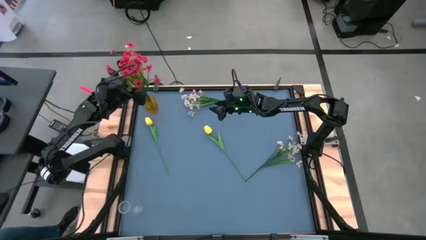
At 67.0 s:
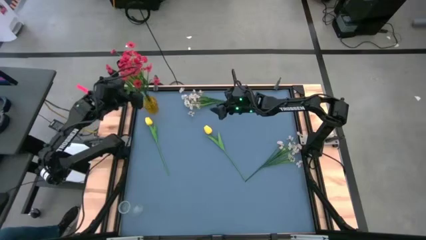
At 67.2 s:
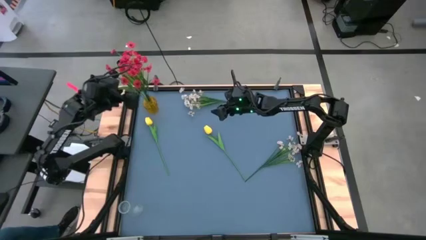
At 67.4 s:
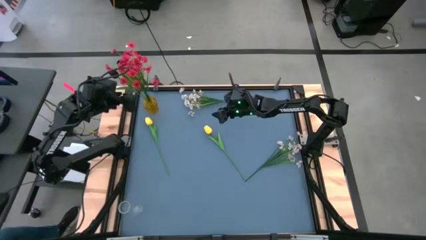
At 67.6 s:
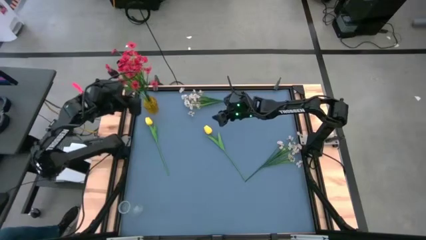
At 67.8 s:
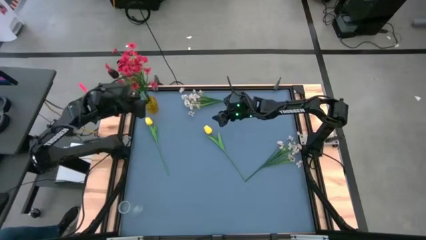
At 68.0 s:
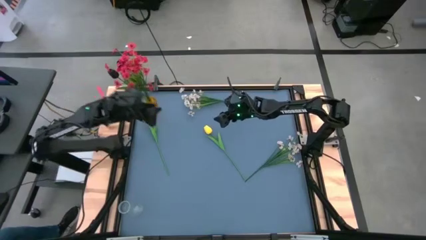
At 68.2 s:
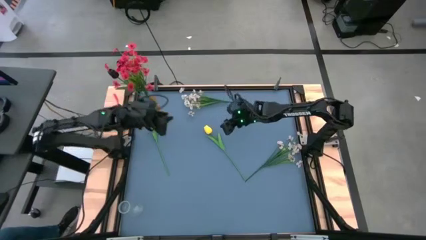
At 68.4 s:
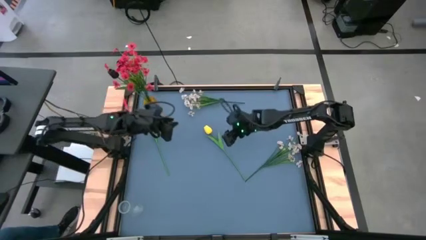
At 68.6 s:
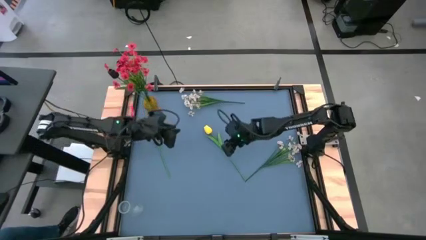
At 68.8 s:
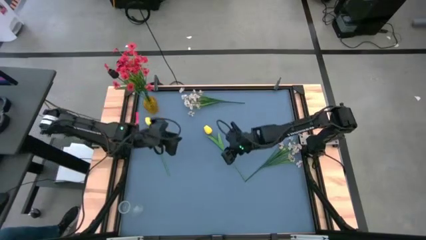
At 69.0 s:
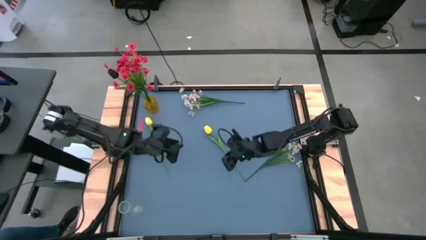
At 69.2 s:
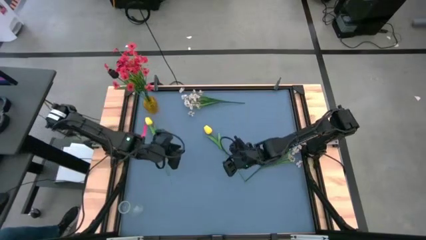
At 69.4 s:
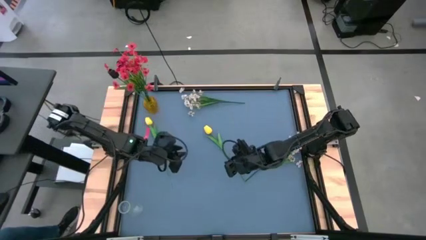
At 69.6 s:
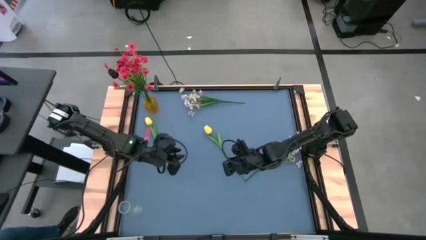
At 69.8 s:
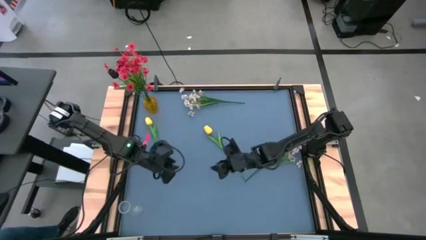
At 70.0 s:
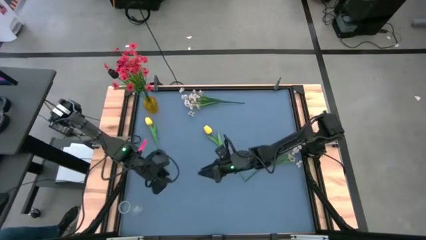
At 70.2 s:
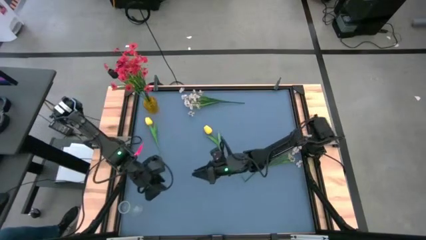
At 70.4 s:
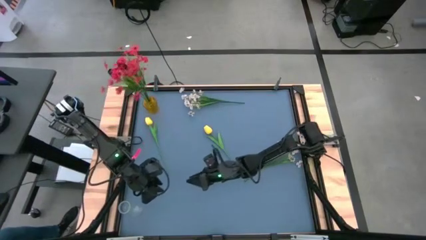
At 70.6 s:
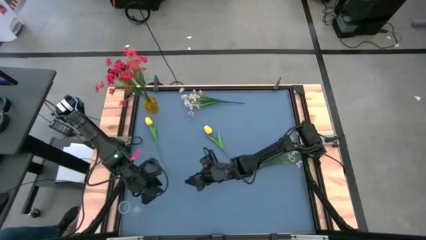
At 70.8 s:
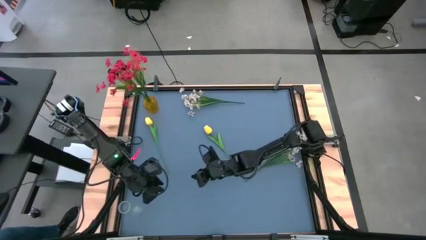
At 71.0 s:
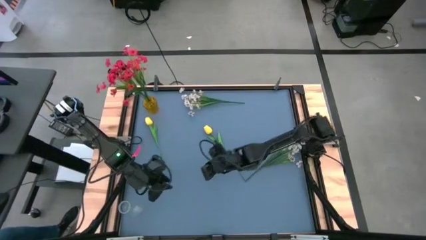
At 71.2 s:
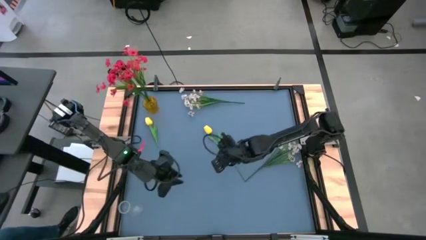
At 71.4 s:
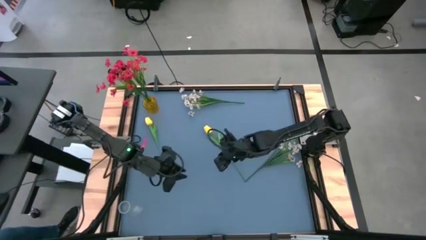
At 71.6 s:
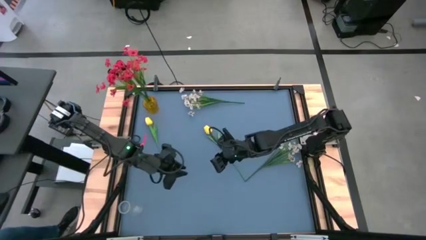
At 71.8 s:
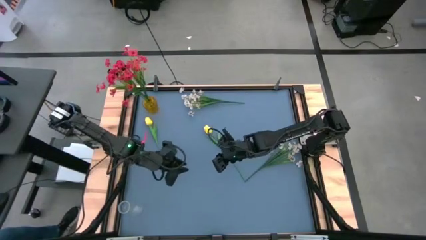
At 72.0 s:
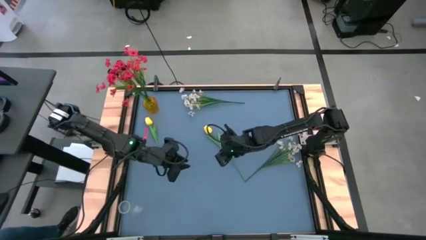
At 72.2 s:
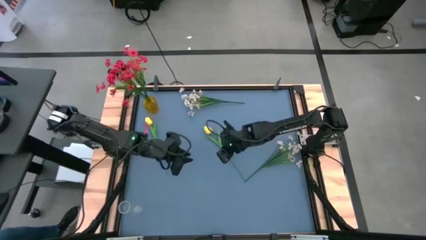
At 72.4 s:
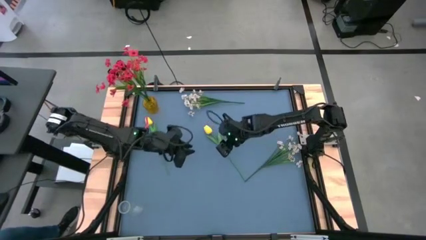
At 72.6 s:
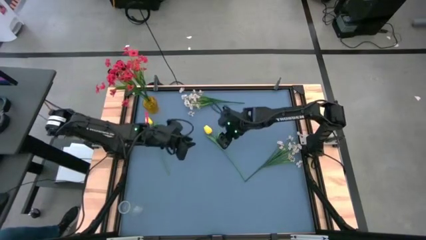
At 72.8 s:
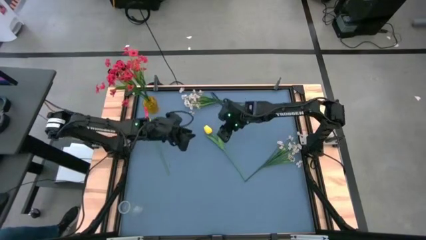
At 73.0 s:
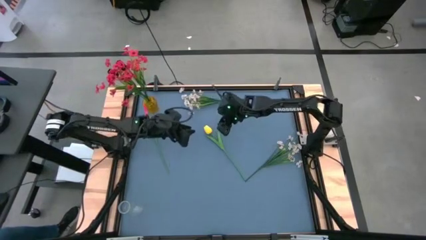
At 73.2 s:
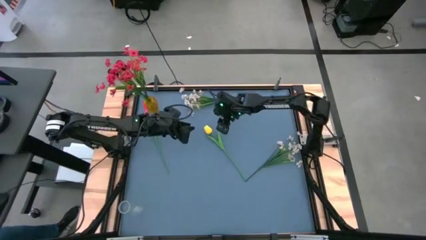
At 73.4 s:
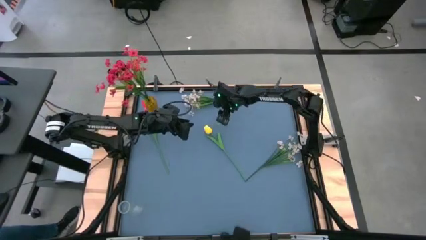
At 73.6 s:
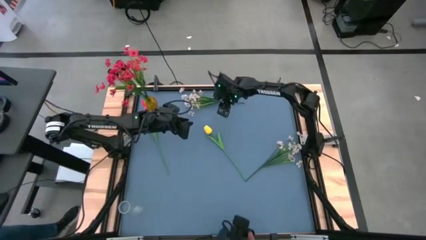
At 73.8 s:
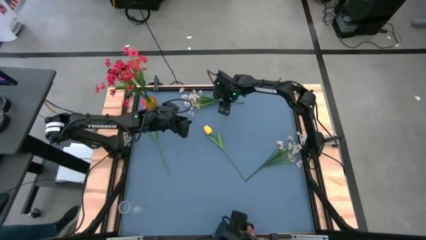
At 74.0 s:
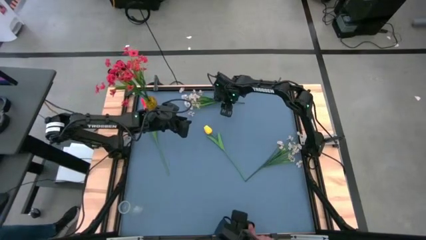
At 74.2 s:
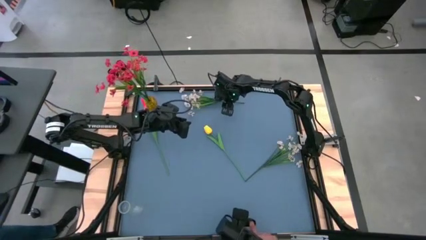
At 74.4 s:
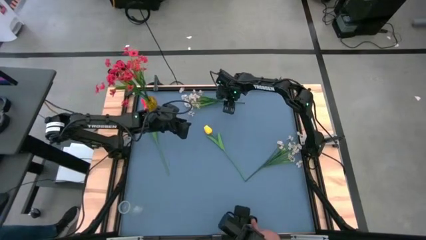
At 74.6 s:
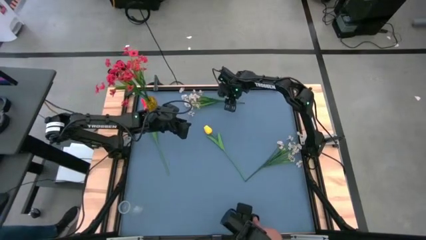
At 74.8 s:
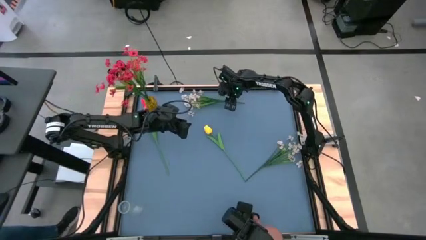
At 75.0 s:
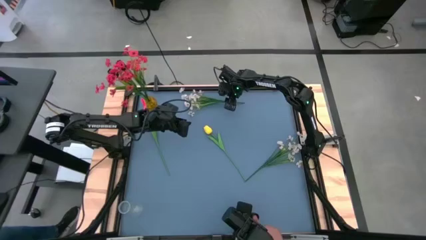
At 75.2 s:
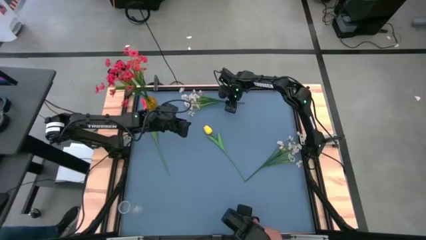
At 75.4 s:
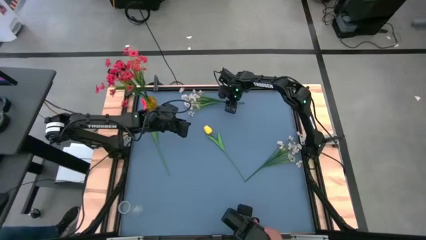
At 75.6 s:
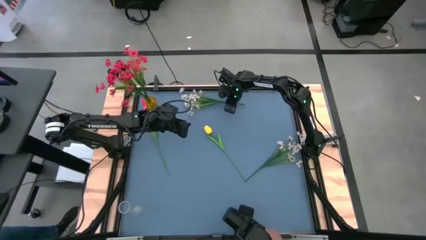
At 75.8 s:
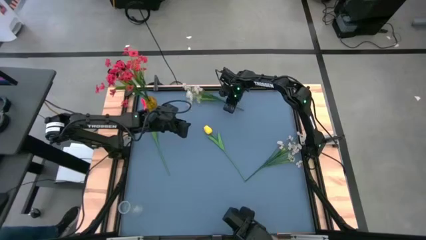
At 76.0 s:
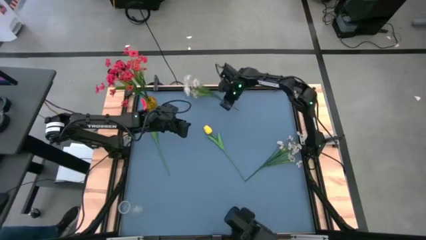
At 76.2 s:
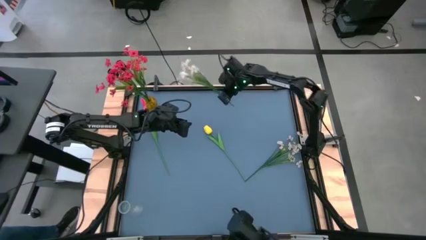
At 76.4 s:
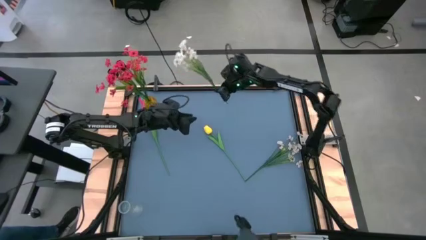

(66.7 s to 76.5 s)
Task: Sort flowers into vase by color
Put the top white flowers into the transparent vase

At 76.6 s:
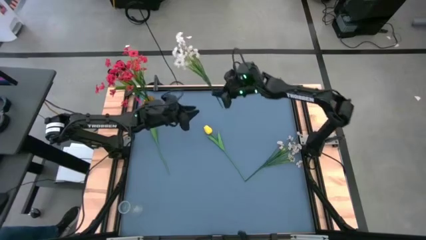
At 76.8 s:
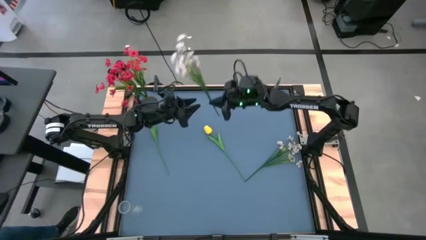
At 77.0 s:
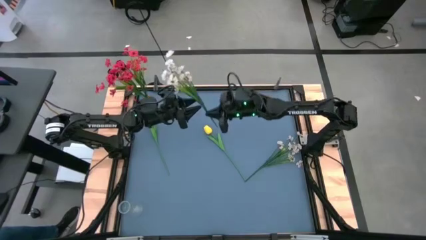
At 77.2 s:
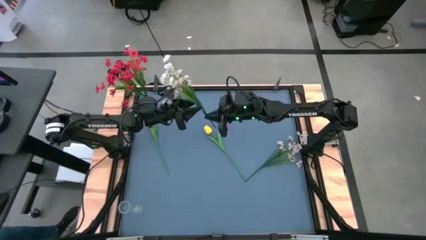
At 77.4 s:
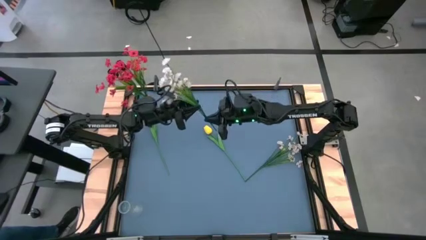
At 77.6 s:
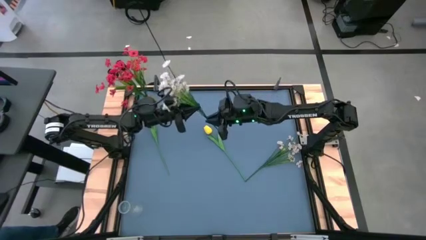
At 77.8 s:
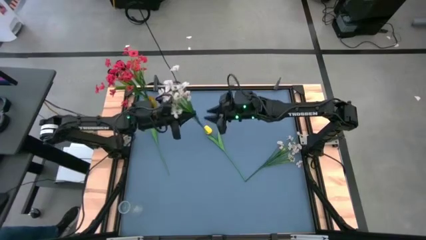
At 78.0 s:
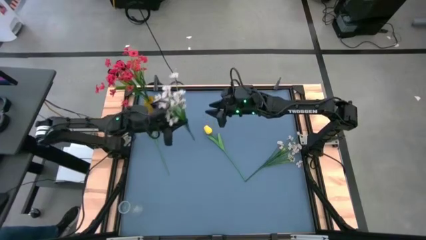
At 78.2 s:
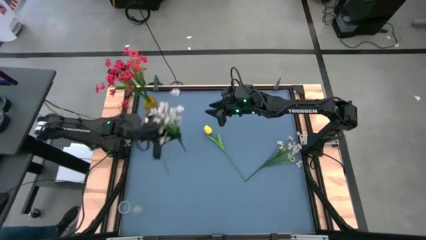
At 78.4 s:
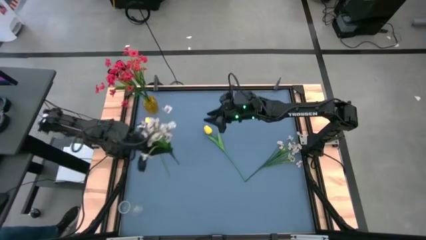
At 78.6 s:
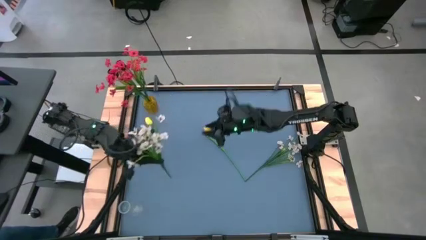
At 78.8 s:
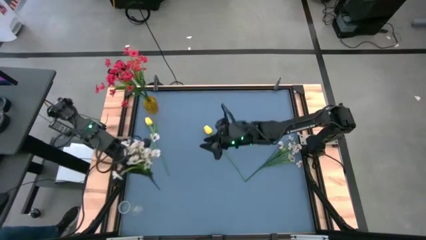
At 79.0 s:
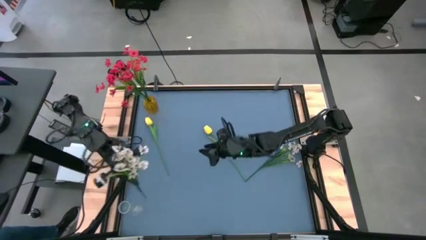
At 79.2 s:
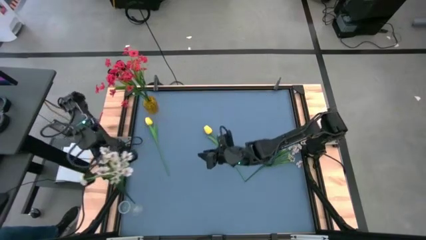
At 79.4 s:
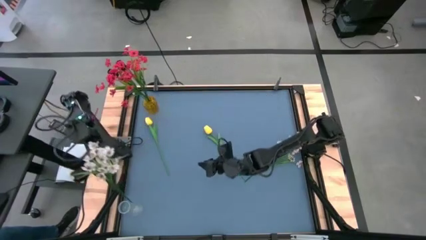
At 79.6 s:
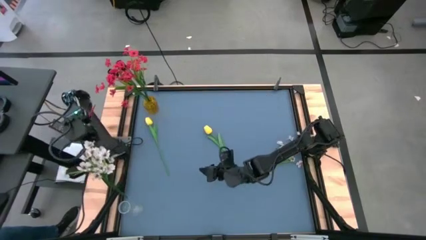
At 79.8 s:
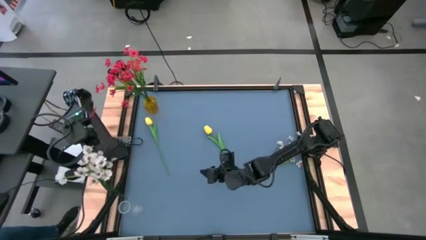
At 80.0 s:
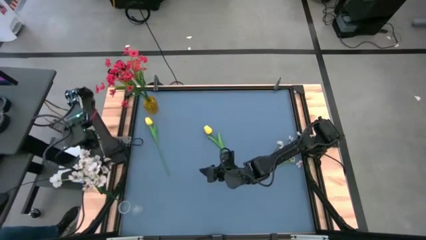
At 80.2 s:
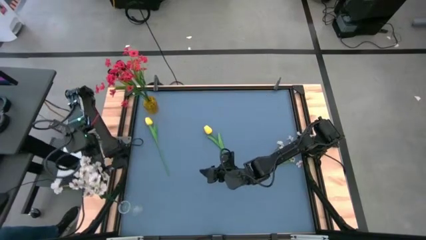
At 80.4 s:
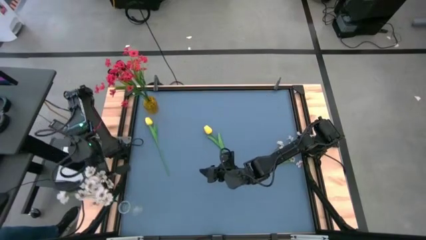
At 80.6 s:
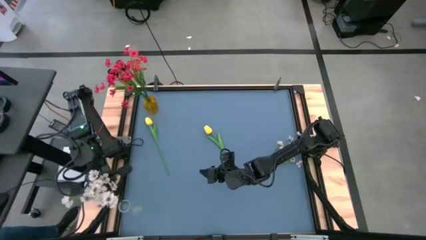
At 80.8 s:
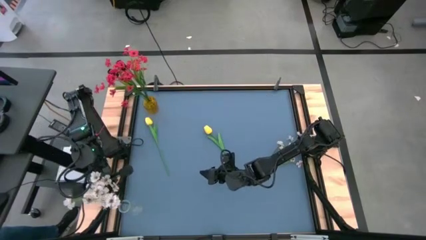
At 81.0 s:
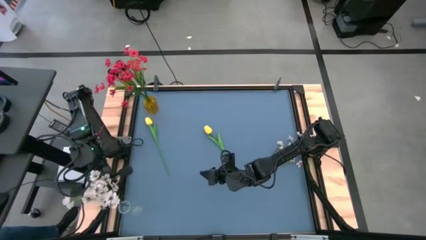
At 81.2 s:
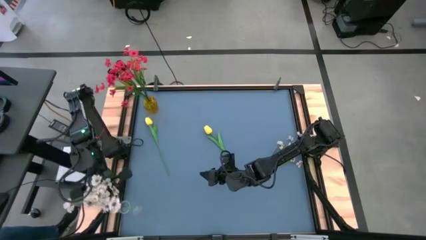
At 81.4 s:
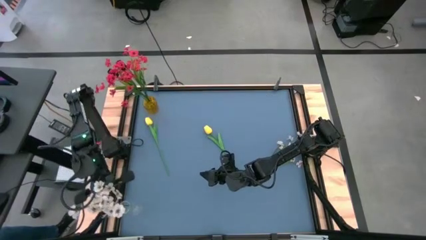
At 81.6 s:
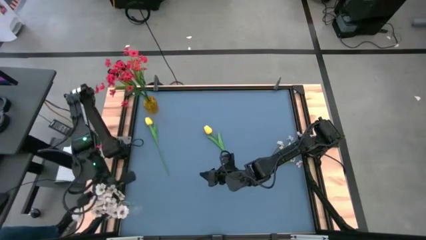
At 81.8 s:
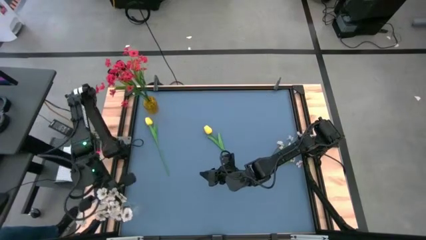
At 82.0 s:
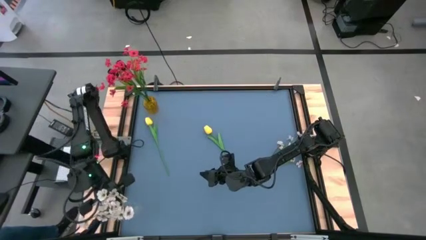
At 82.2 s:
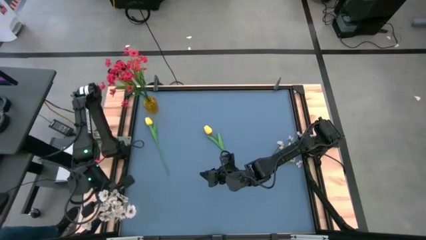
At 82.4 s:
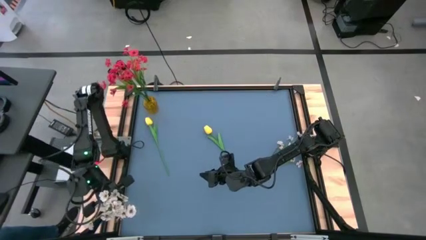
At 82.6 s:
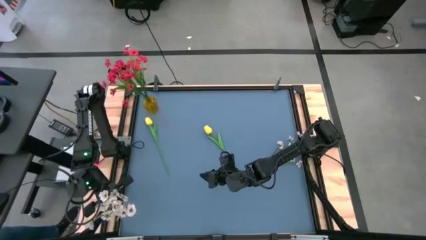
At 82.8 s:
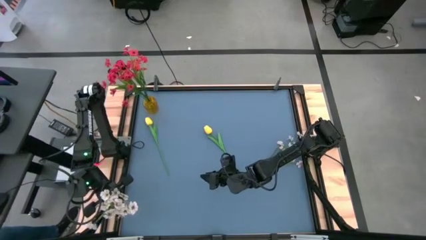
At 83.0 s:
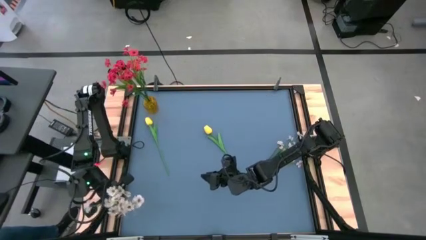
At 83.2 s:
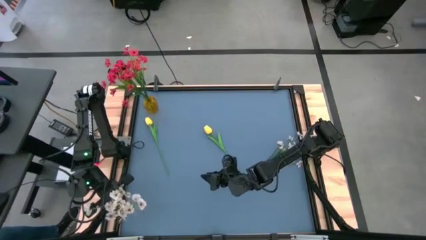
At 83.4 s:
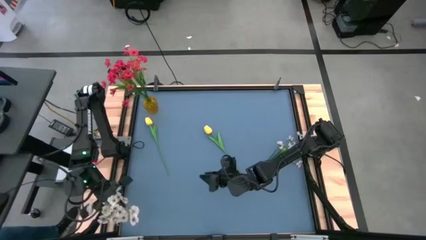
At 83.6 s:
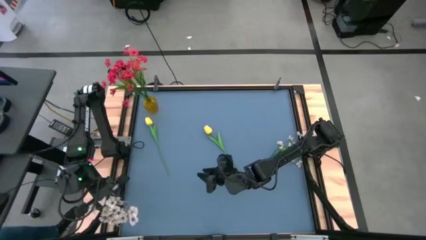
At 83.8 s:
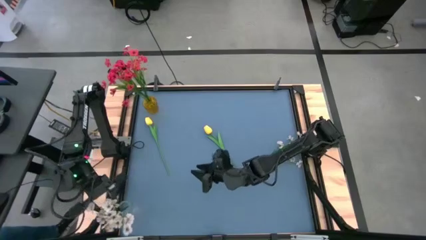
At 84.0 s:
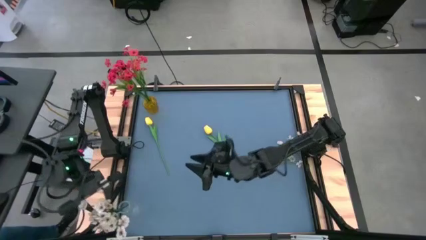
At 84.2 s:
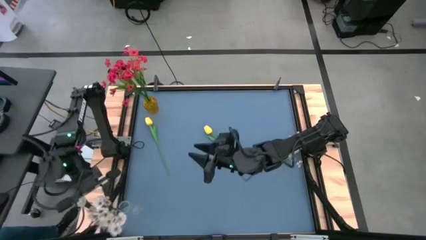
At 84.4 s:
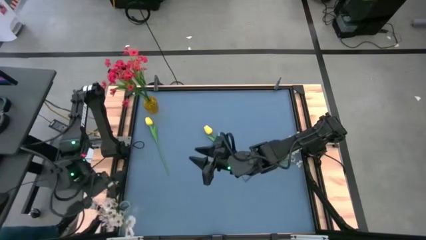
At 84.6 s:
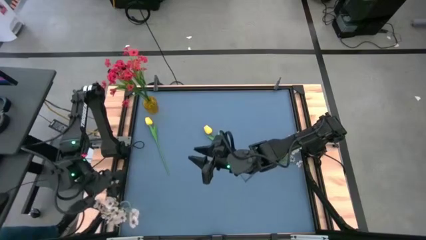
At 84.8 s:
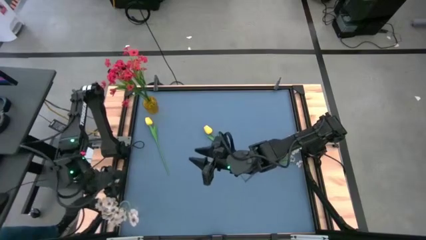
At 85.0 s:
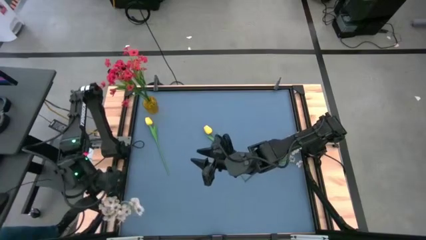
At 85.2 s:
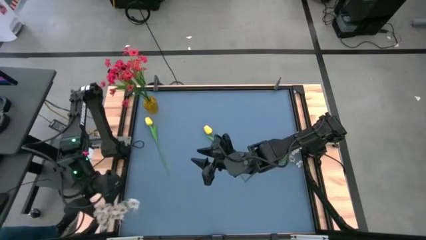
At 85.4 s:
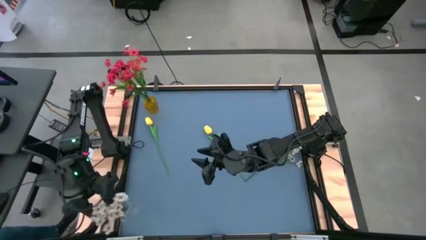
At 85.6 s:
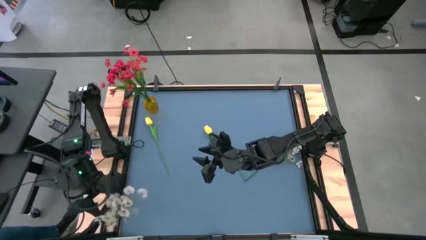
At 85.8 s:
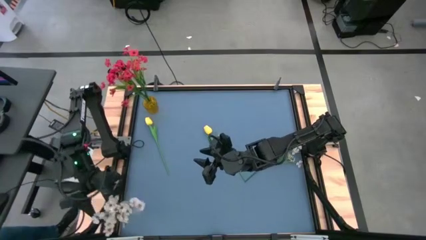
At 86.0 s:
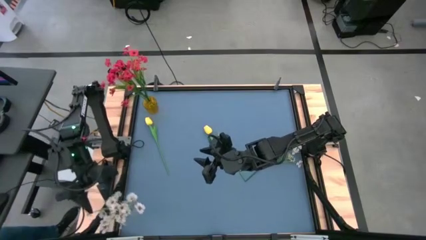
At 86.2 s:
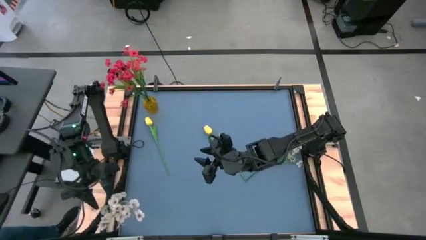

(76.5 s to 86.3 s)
Put the top white flowers into the transparent vase
